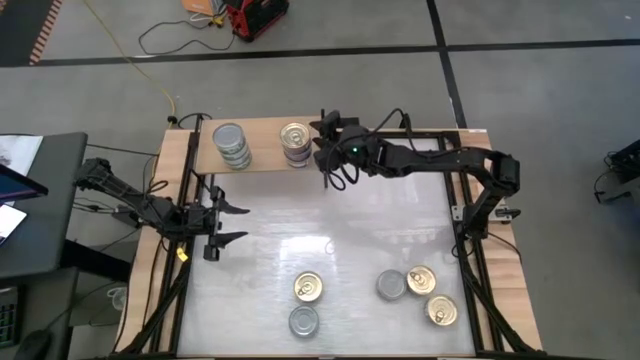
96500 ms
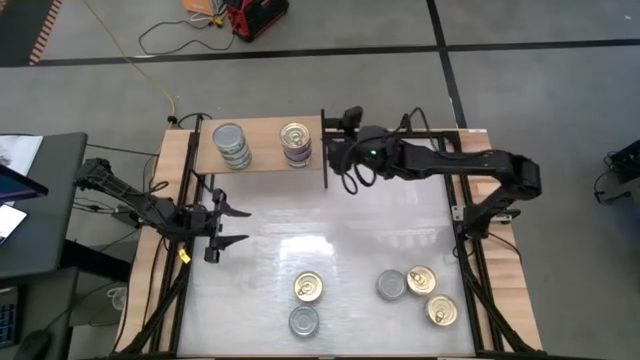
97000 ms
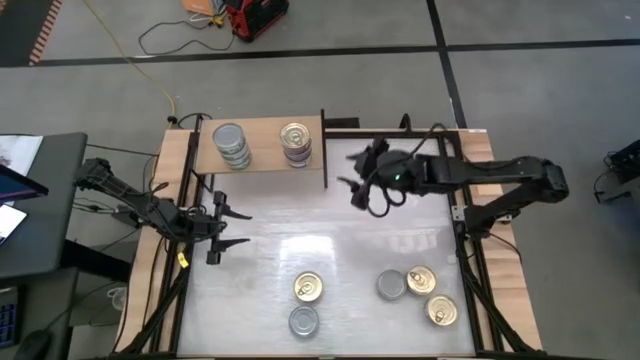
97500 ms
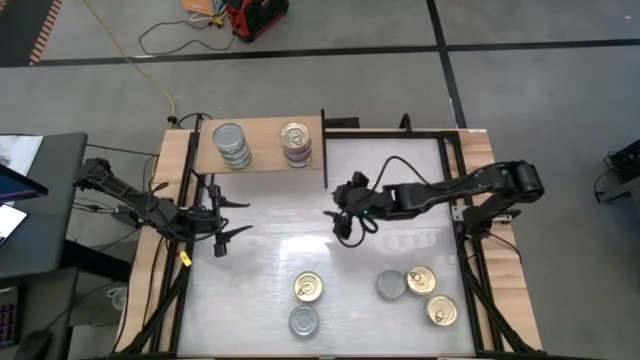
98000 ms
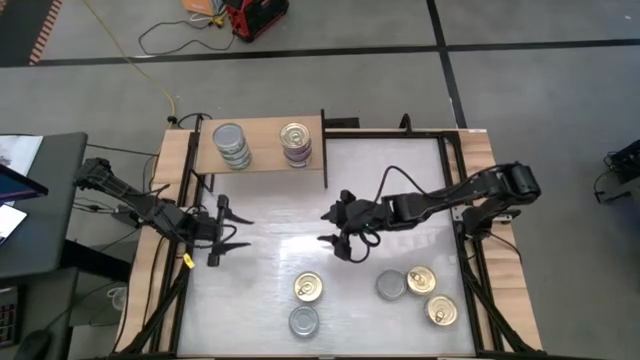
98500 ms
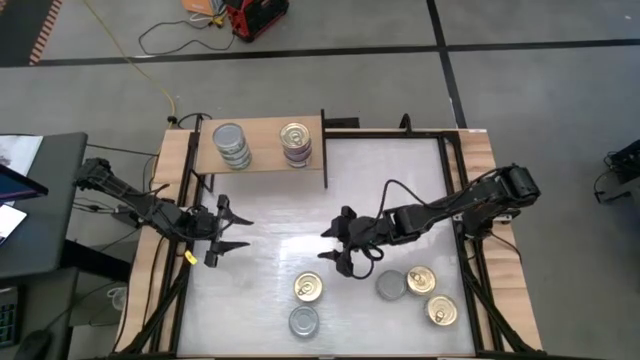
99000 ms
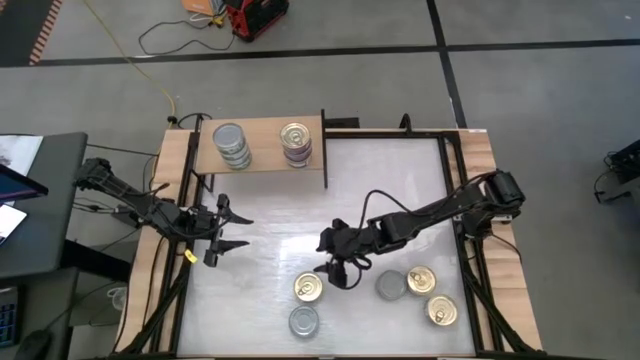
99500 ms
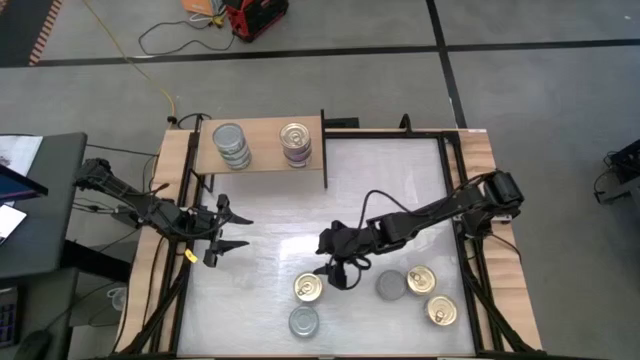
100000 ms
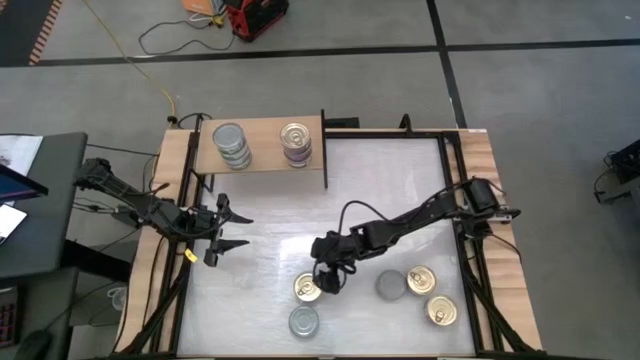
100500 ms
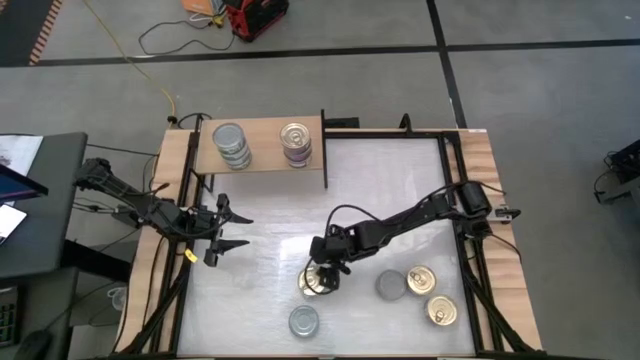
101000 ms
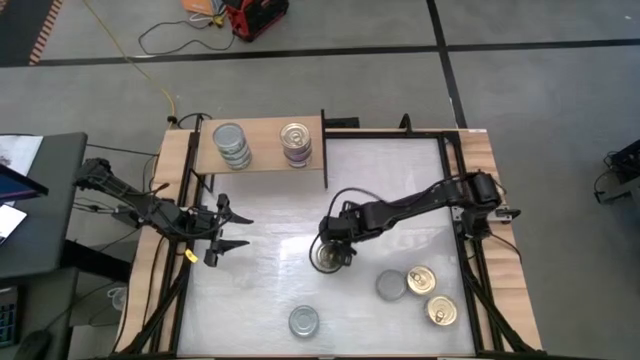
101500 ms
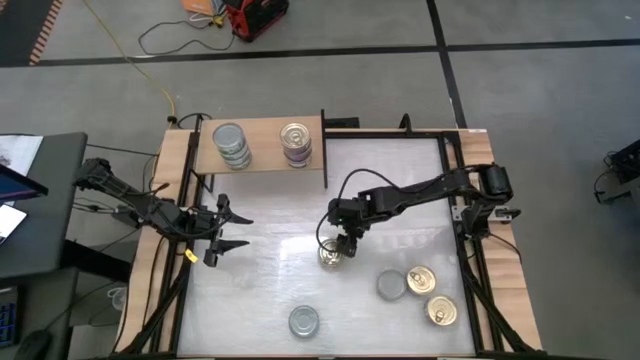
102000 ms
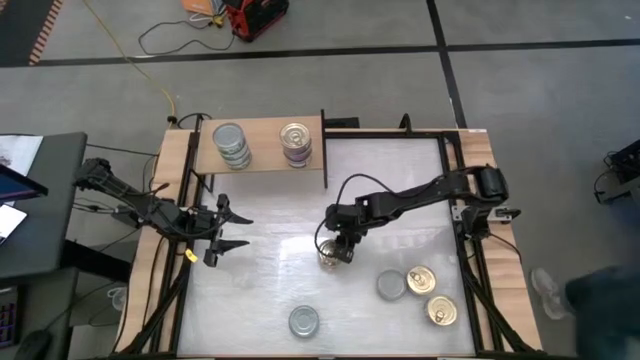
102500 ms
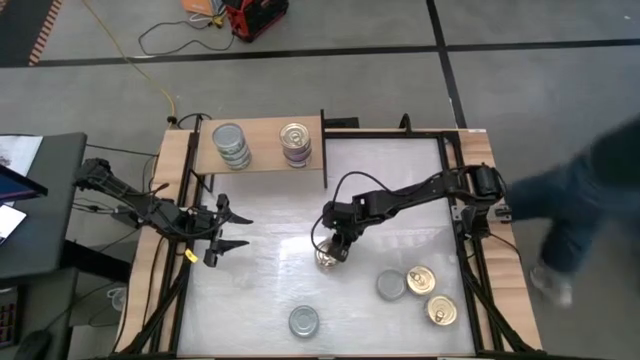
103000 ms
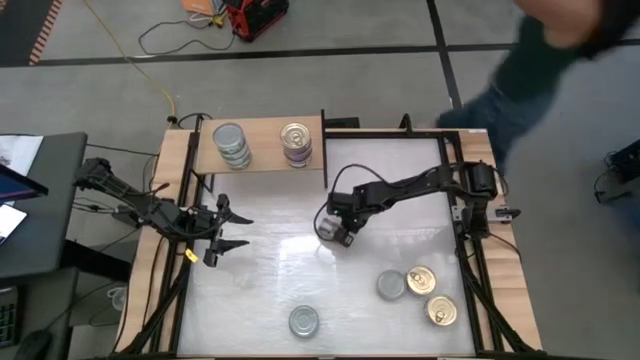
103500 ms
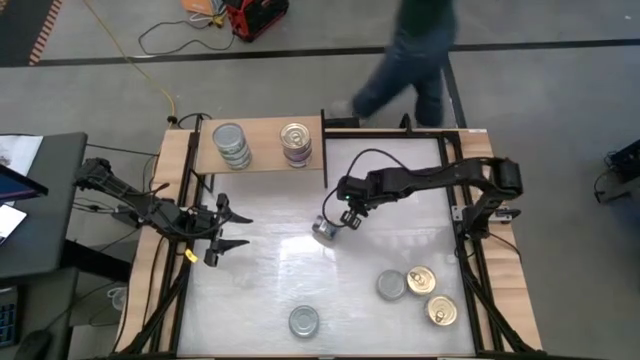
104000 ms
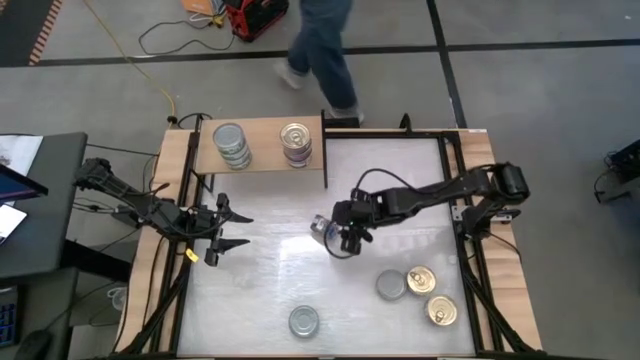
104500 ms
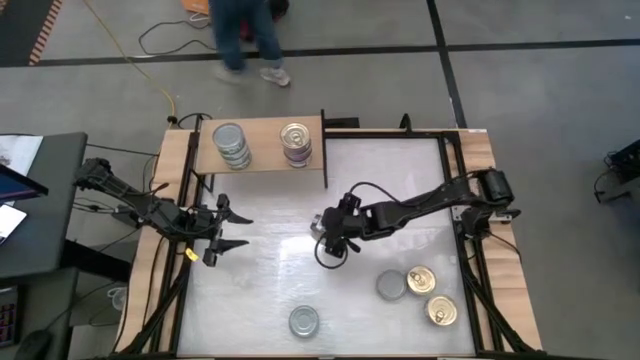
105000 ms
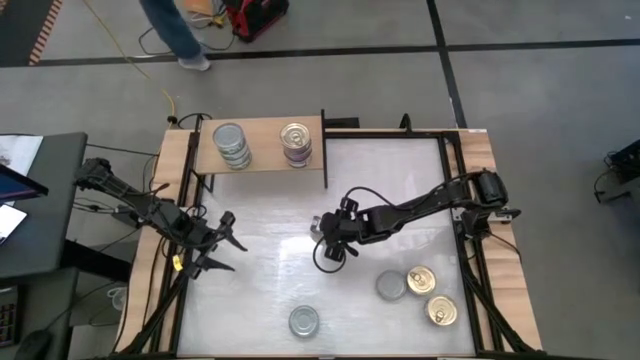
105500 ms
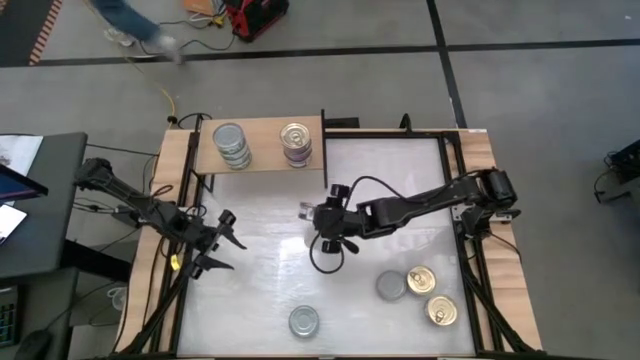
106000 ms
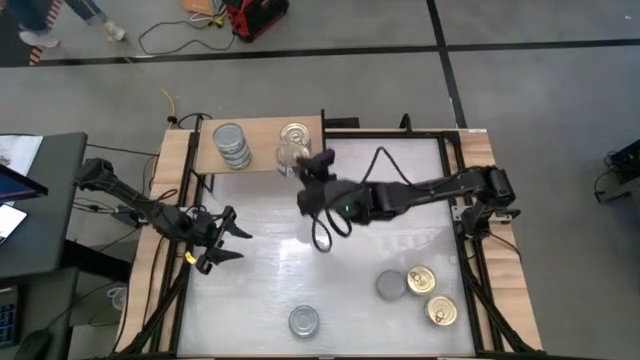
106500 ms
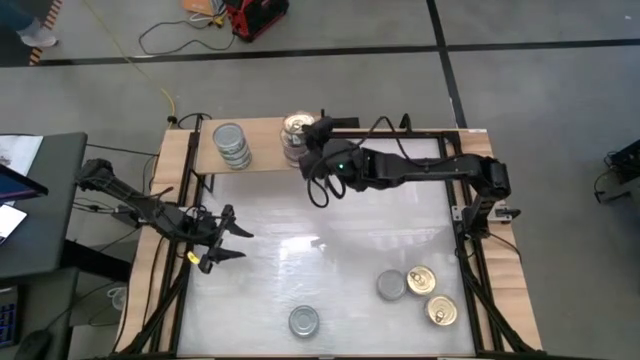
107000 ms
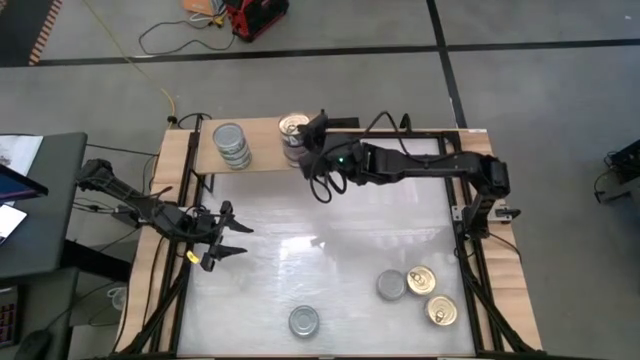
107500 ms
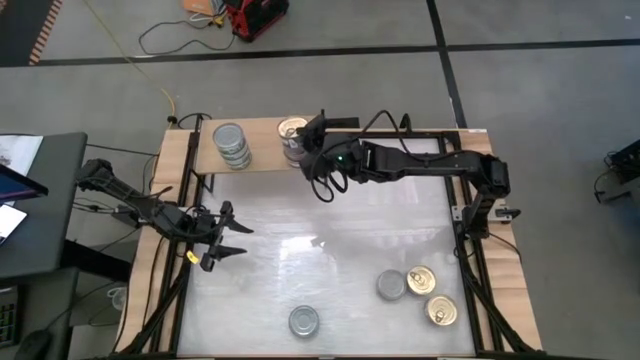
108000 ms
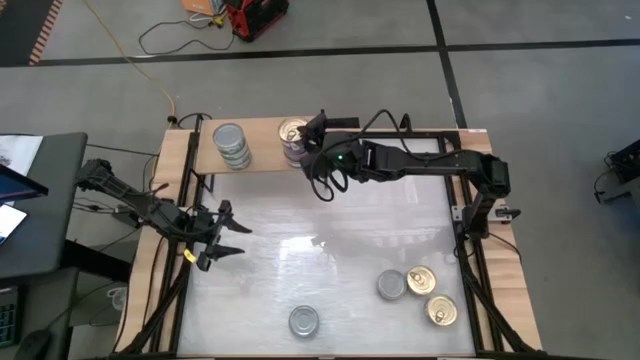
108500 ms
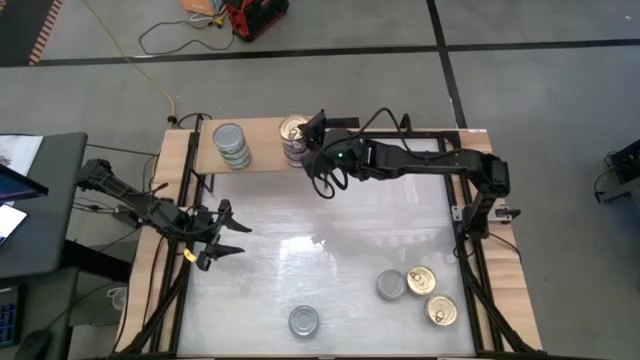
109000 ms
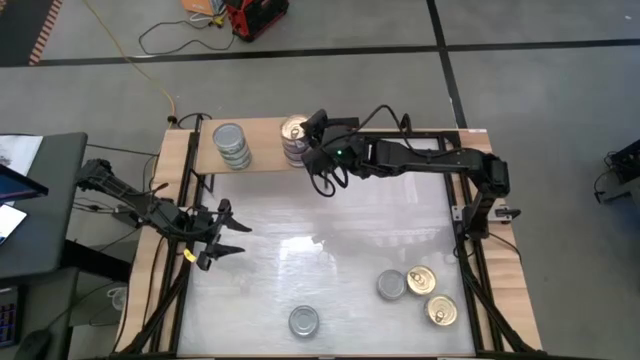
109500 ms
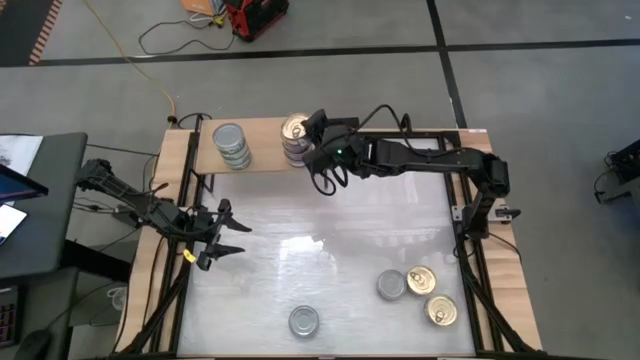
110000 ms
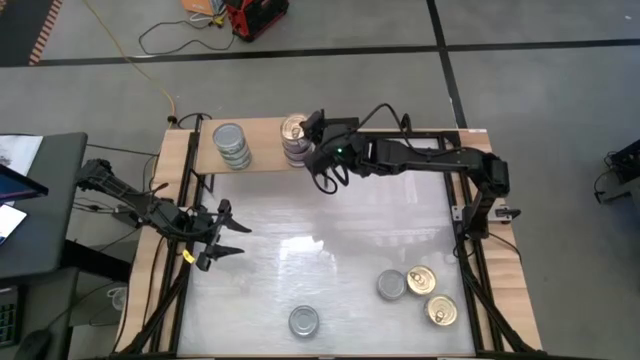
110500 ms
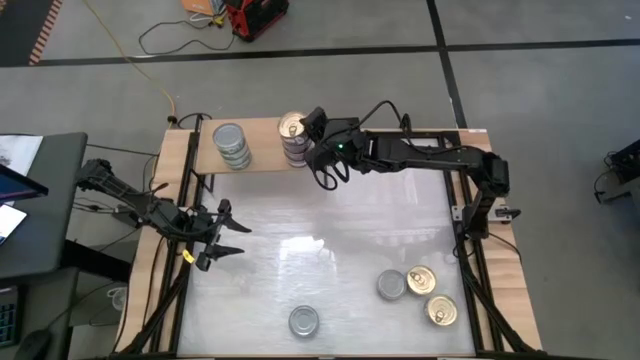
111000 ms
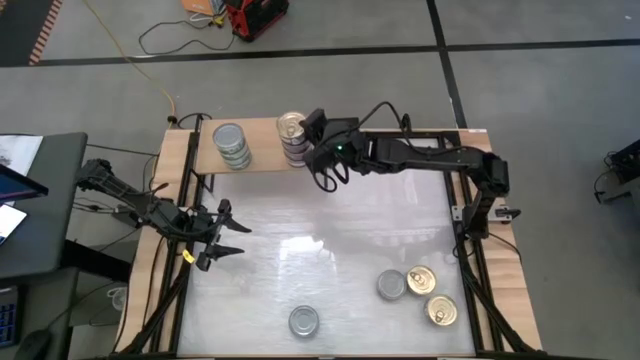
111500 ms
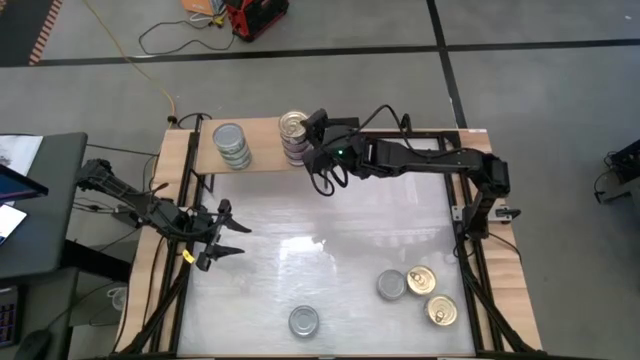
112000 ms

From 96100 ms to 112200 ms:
Task: Stack canned seafood by type on shelf
Stack the blue-pink tuna can on top of the other blue-pink tuna cans on the shelf

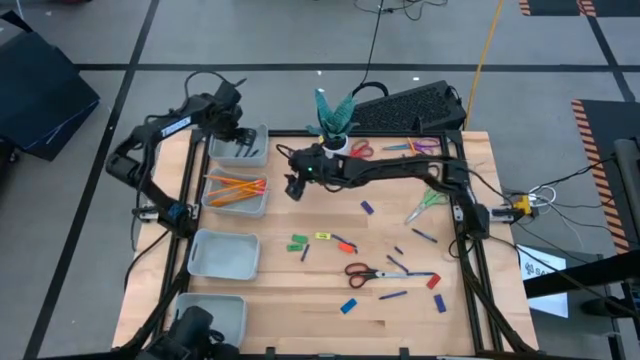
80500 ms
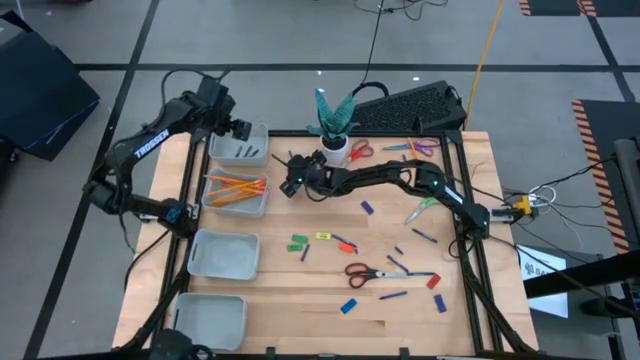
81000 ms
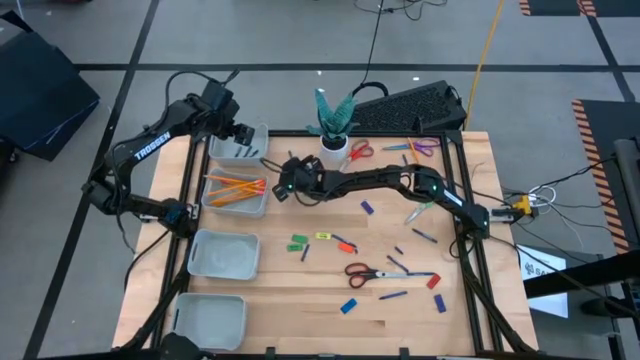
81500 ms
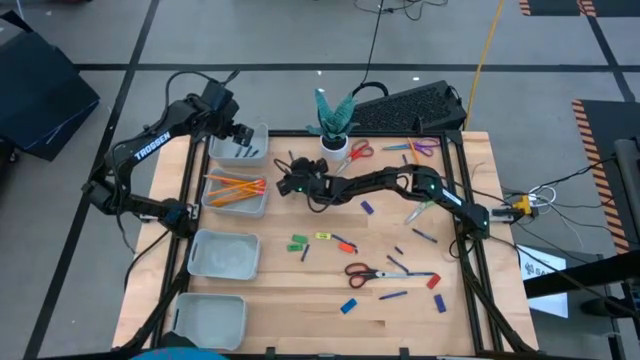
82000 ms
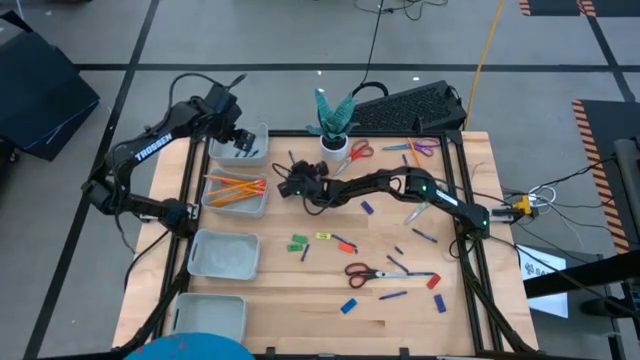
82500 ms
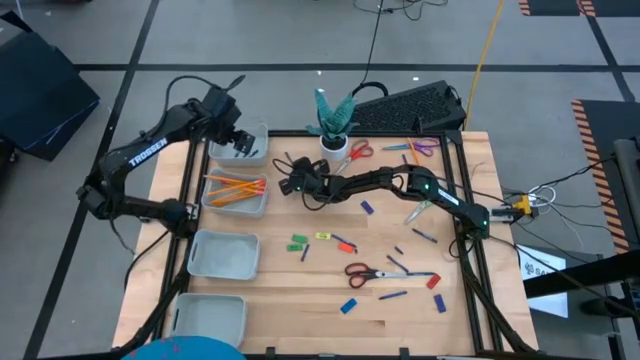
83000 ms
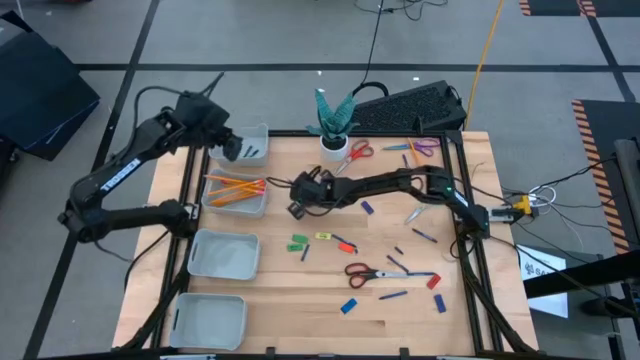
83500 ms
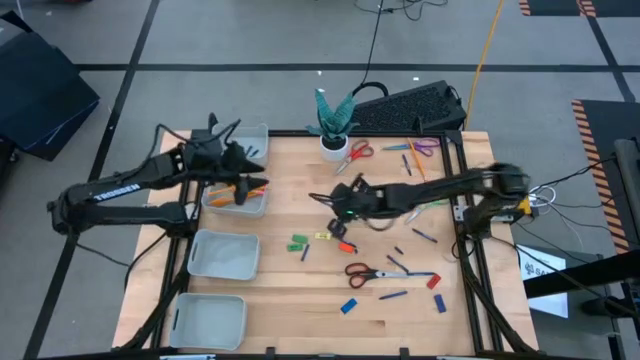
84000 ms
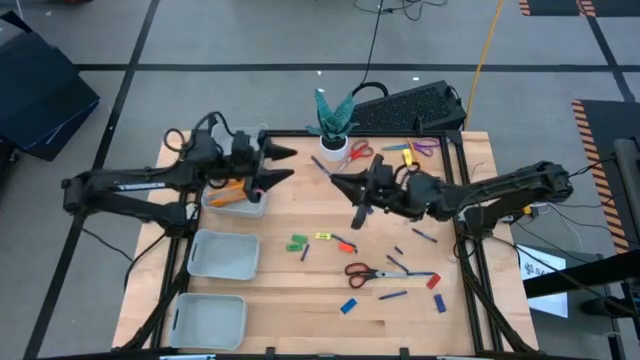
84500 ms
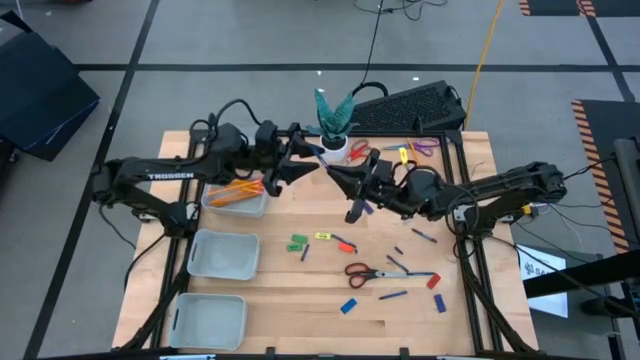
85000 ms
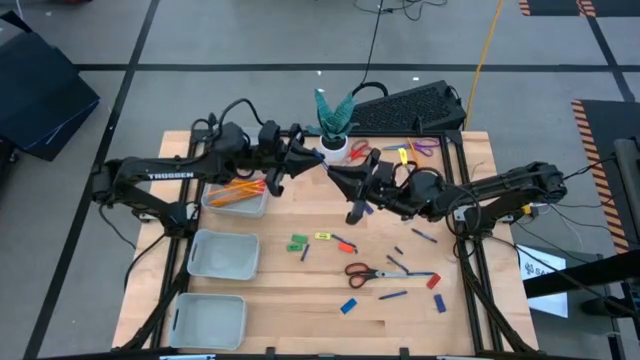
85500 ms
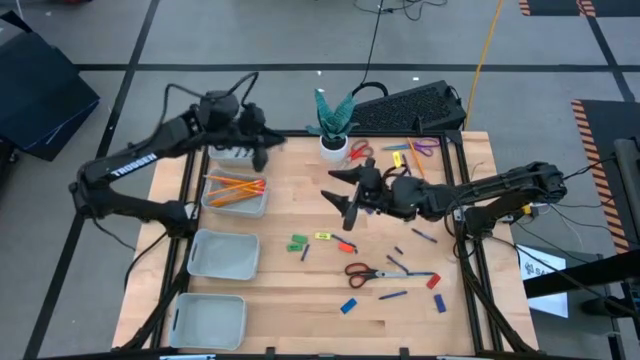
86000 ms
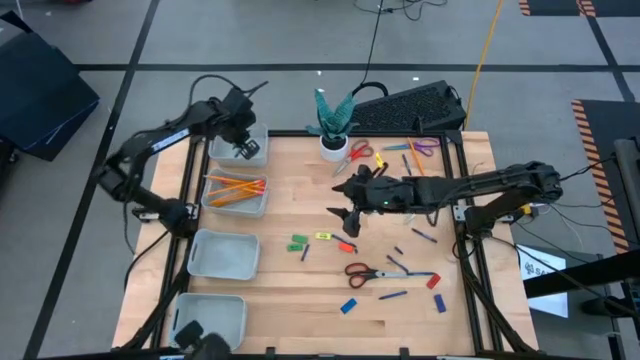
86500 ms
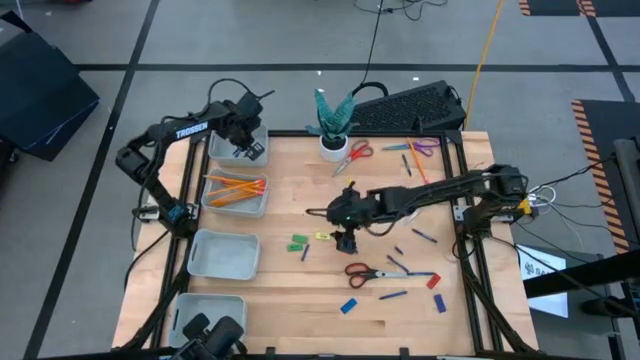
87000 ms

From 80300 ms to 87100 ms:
Task: Sort crayons/erasers/pens/pencils in bins
Put the blue crayon into the top gray bin
